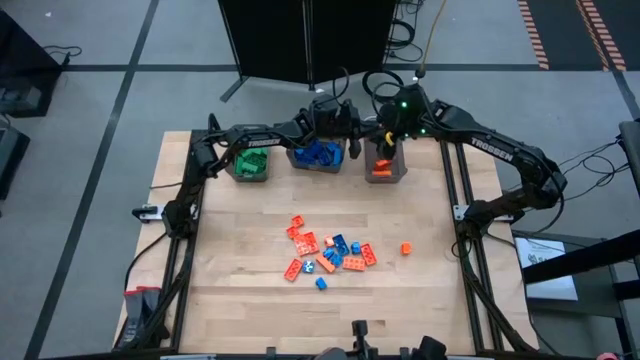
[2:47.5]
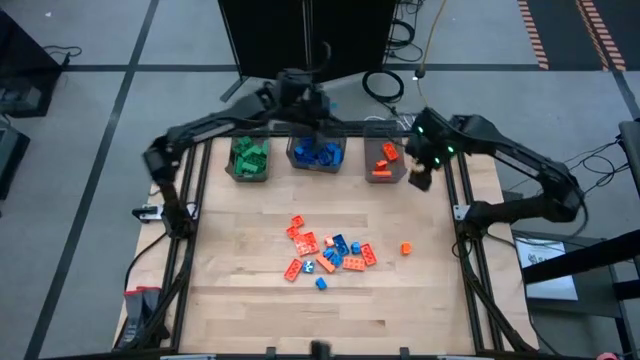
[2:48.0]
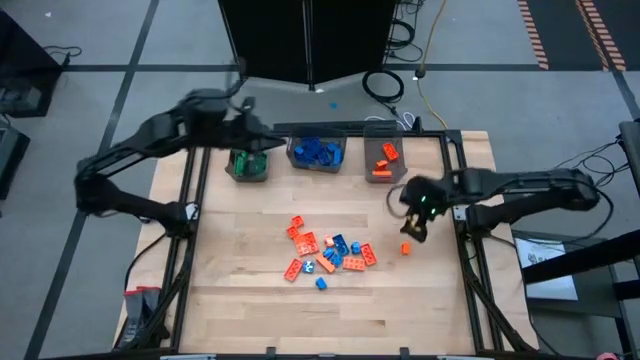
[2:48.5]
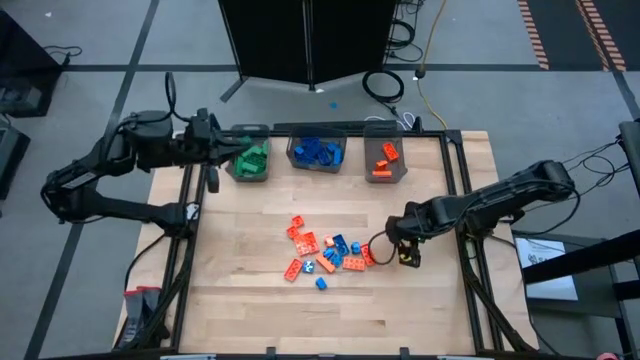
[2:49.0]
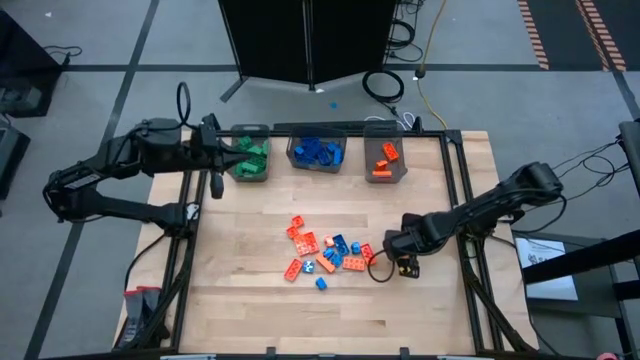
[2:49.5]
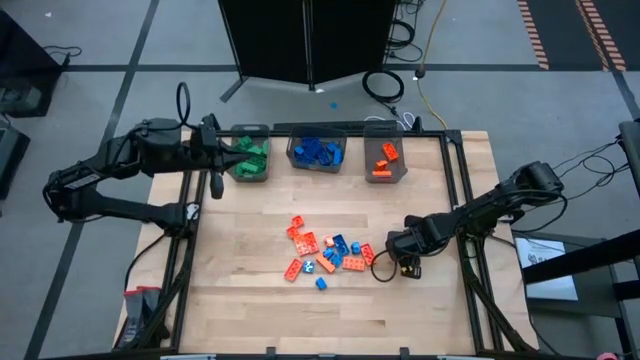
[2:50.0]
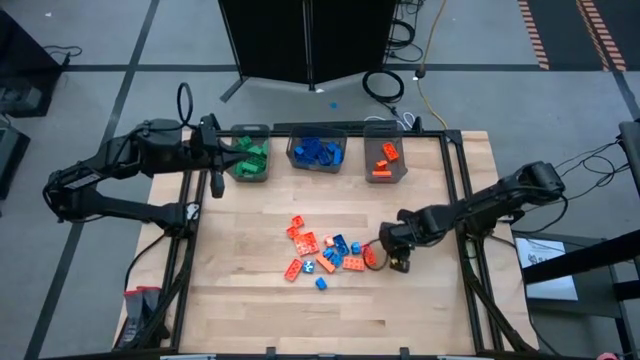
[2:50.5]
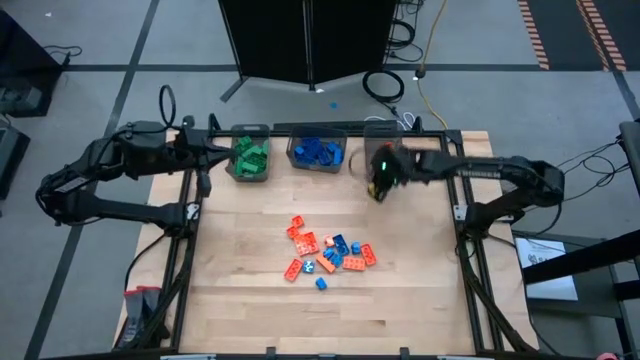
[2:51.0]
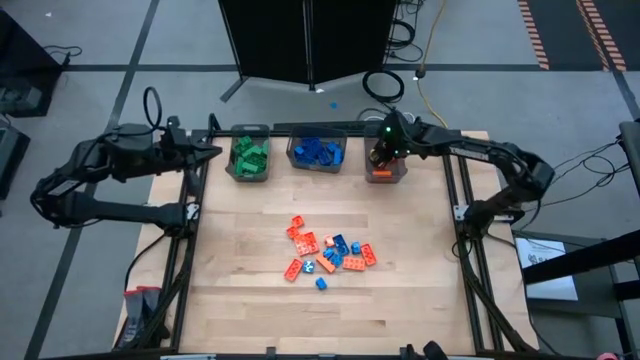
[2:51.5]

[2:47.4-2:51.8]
Task: Sort blocks
Put the orange game piece into the right black bin

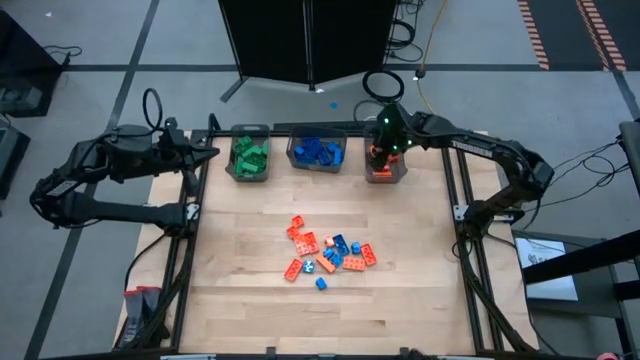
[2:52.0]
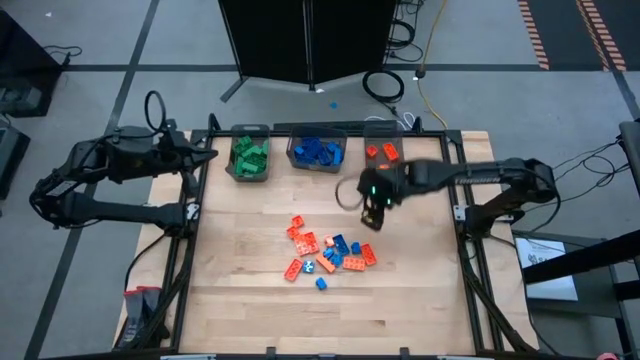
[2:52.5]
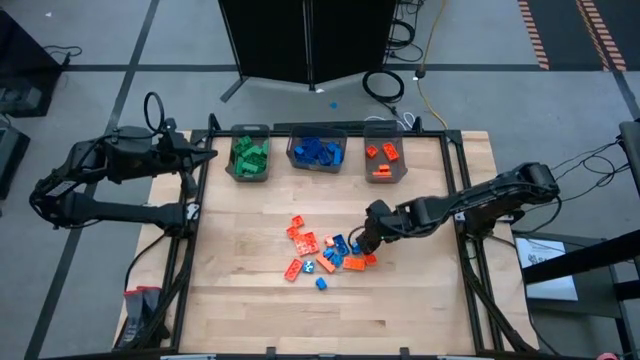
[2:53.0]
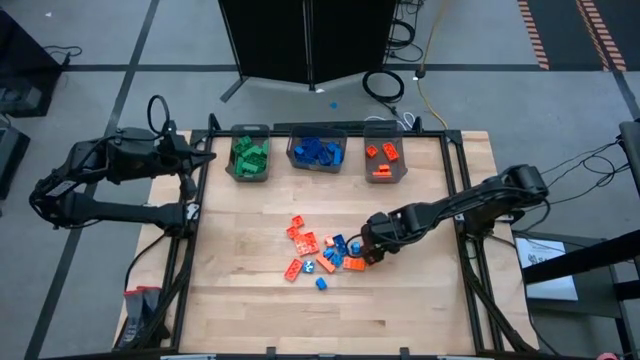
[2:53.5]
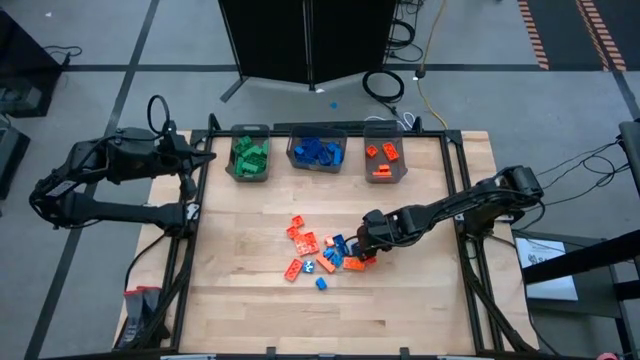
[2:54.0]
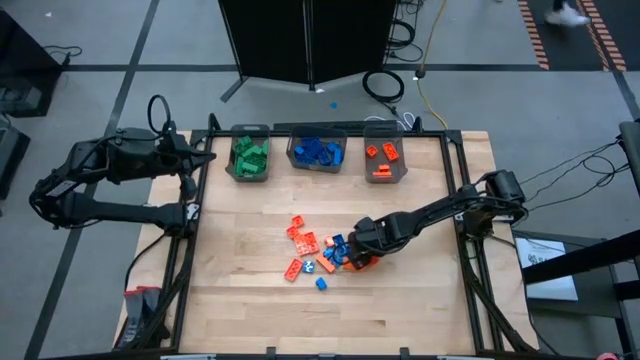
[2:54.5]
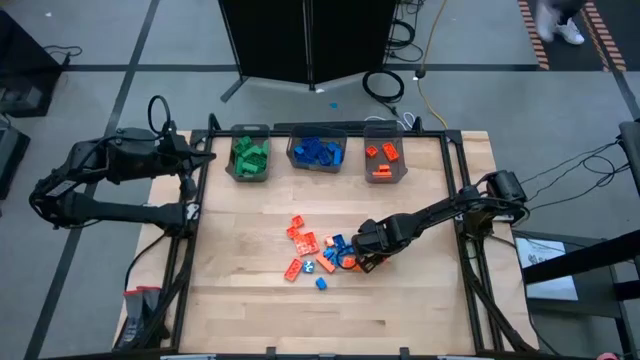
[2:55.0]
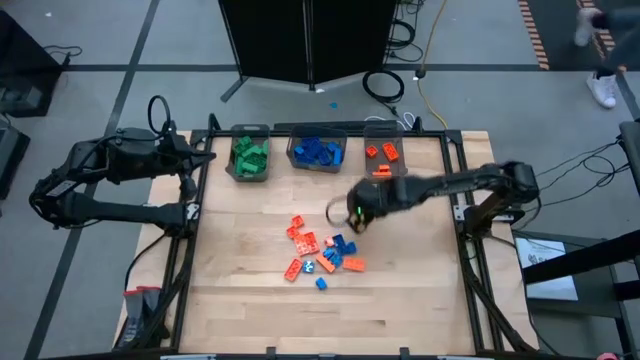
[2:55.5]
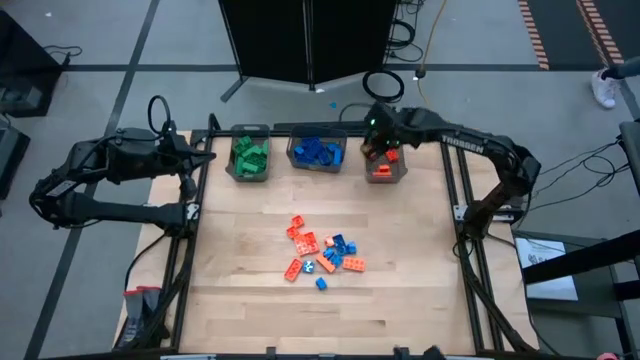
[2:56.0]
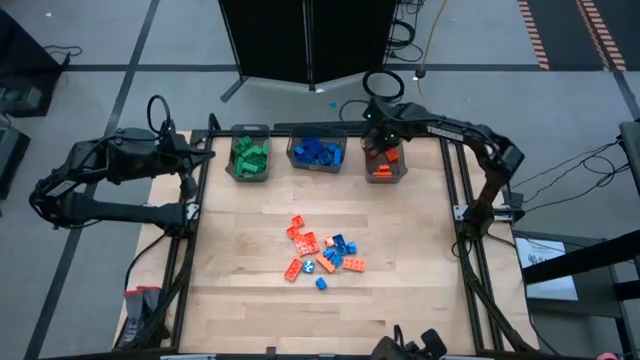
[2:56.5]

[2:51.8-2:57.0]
Put the orange game piece into the right black bin

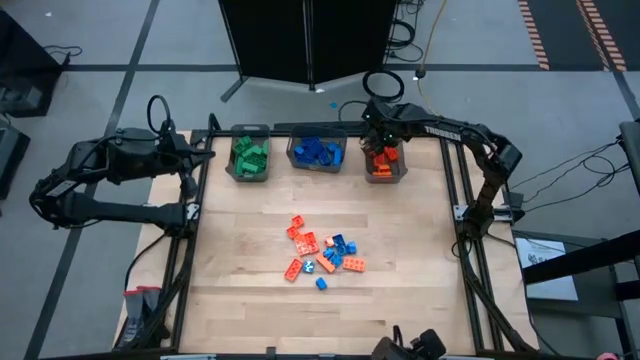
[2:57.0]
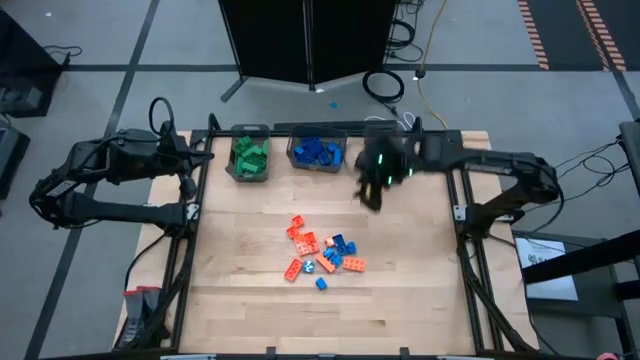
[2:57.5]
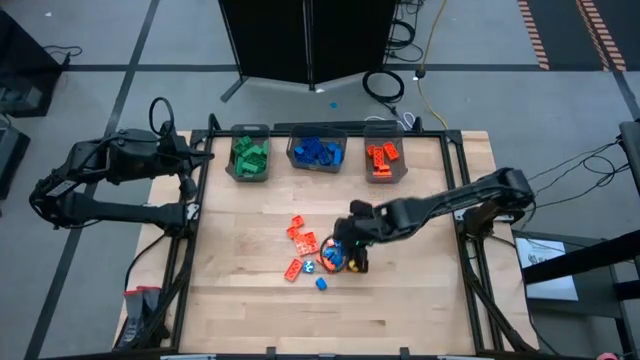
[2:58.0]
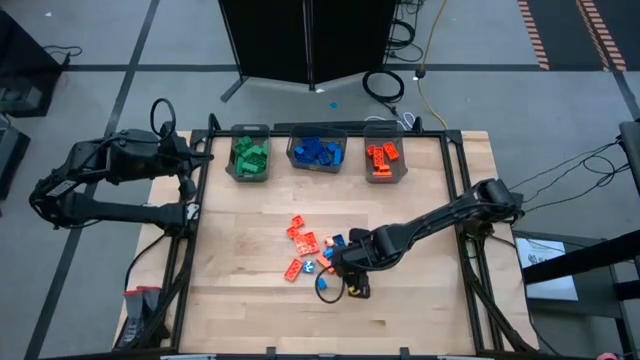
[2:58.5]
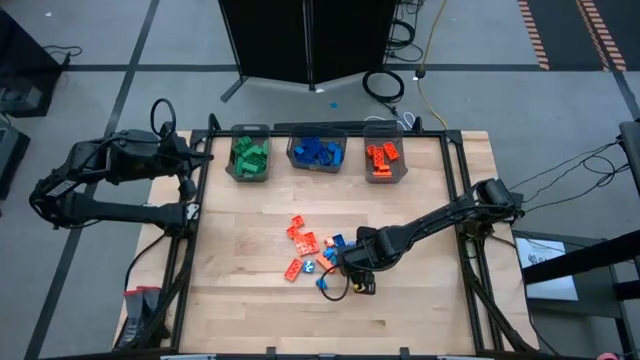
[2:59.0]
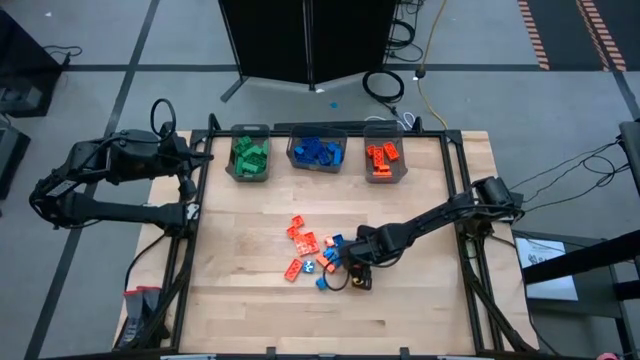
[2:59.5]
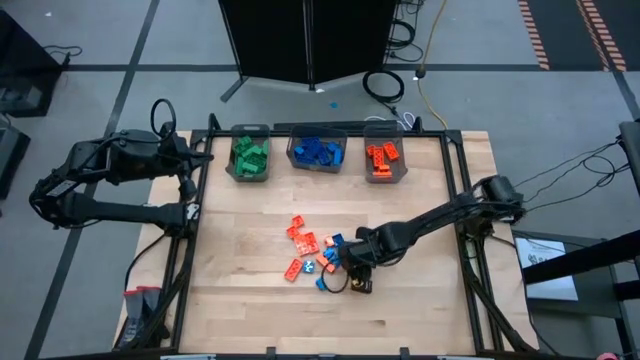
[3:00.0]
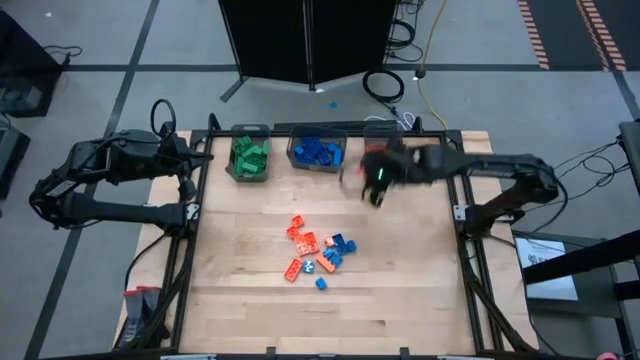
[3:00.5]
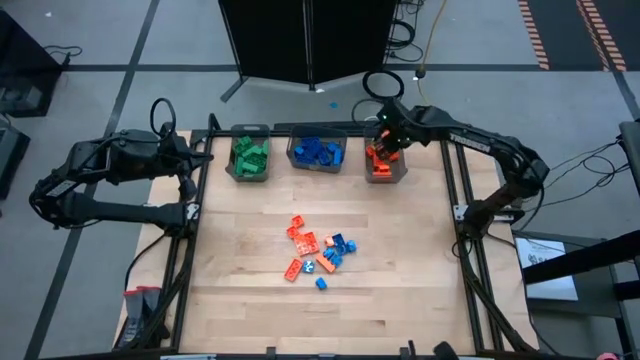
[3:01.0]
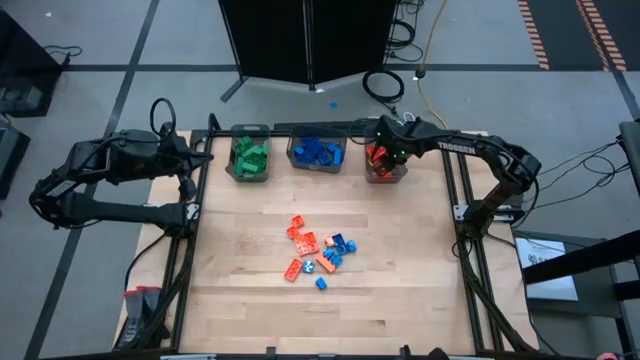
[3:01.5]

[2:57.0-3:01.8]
Put the orange game piece into the right black bin

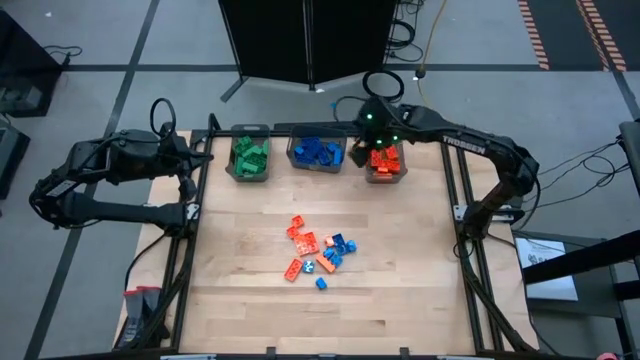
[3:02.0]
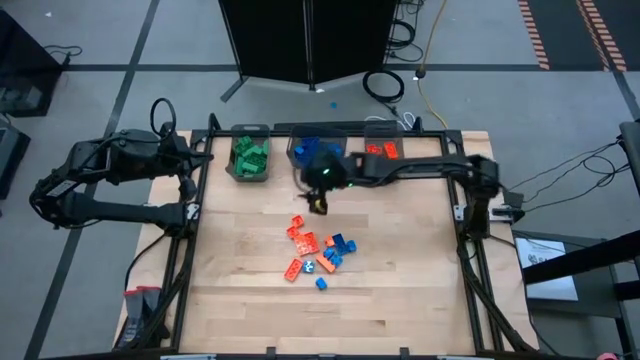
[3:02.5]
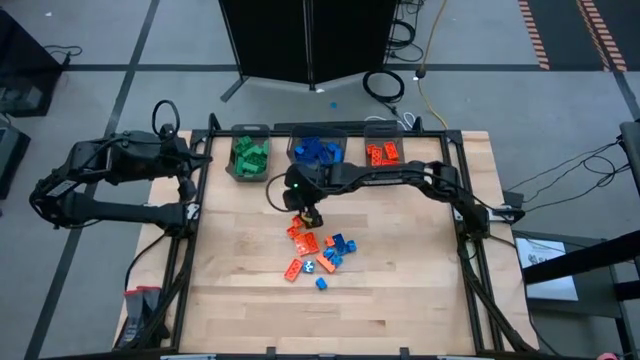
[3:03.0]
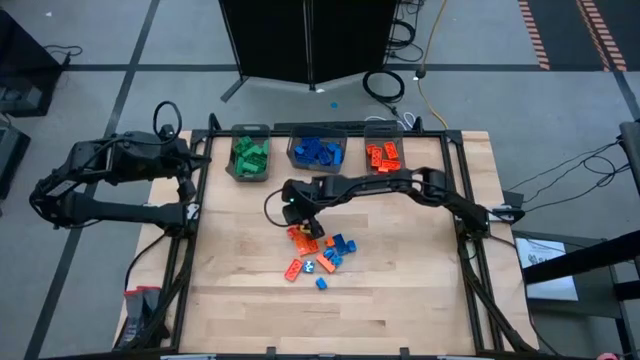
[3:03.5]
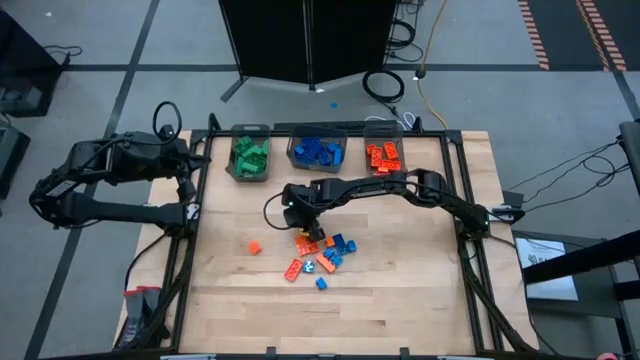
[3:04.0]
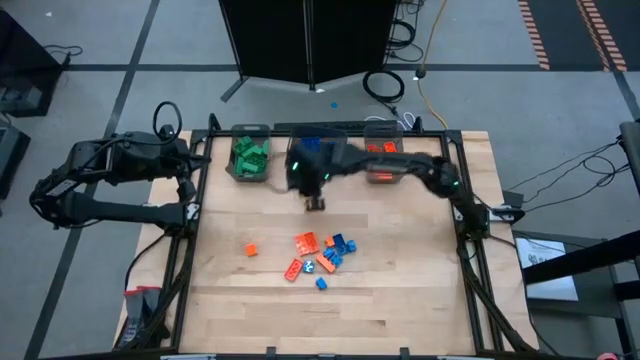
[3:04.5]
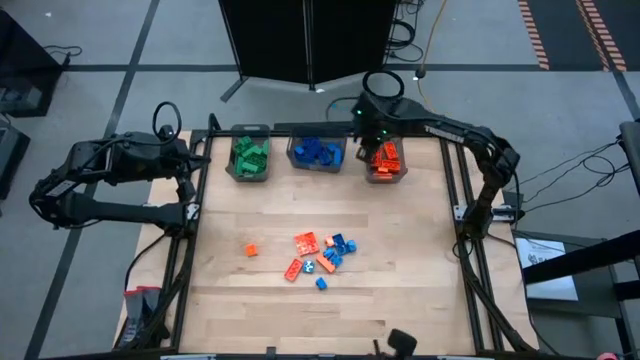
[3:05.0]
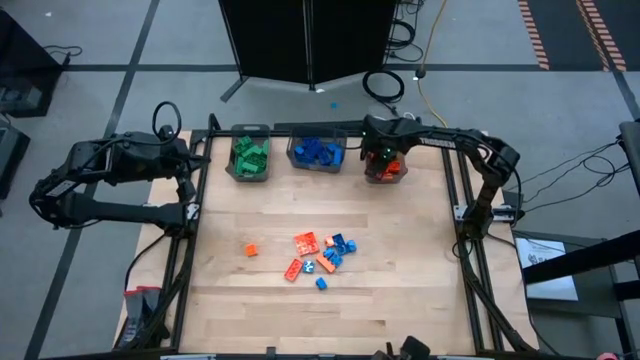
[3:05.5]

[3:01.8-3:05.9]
Put the orange game piece into the right black bin

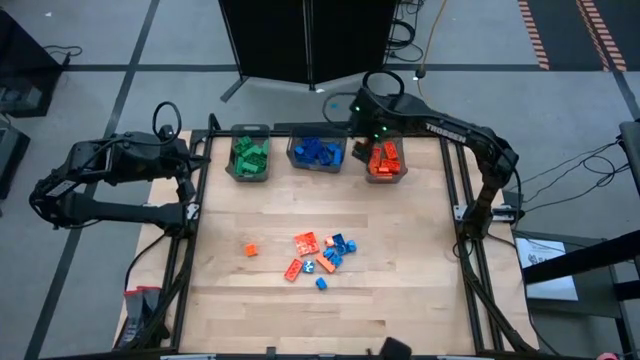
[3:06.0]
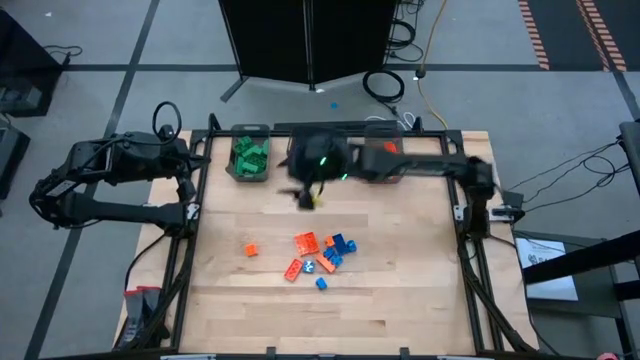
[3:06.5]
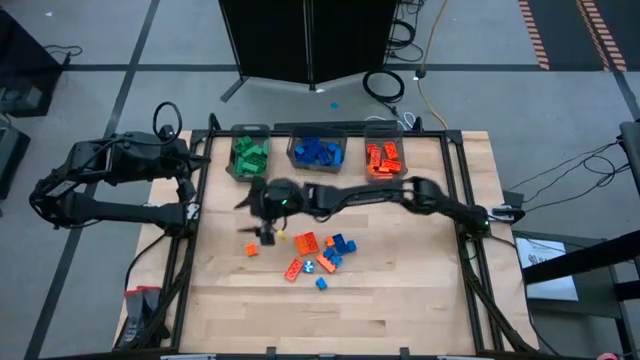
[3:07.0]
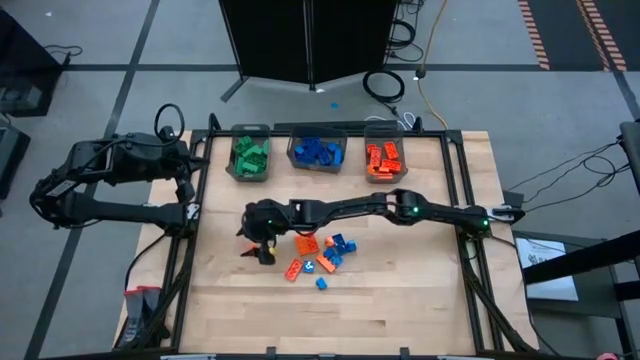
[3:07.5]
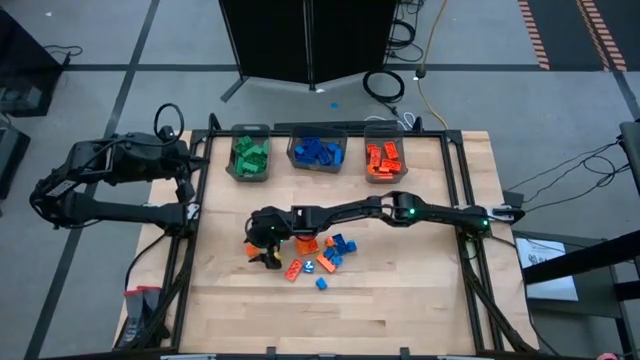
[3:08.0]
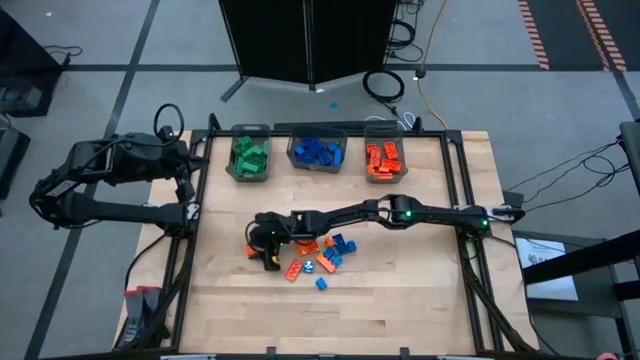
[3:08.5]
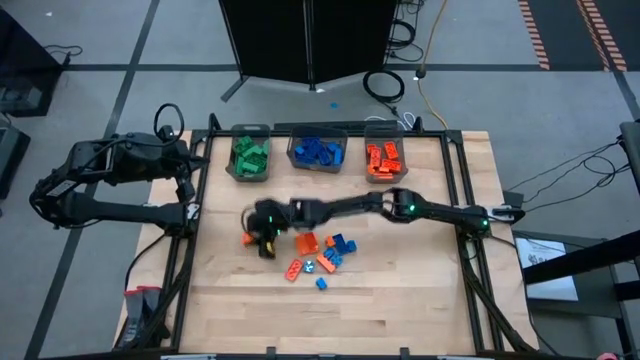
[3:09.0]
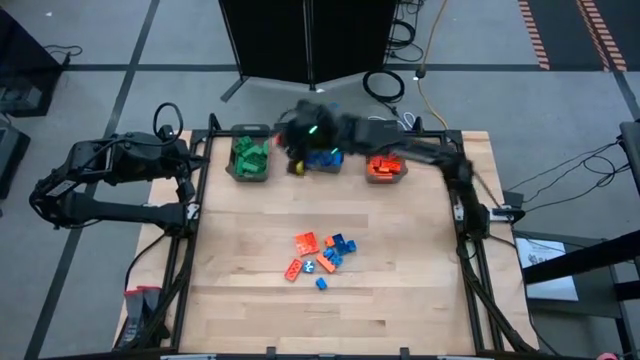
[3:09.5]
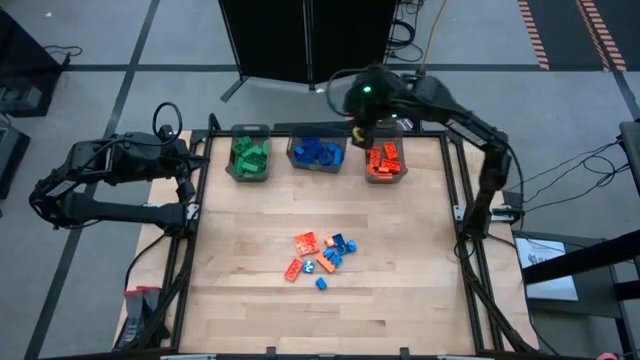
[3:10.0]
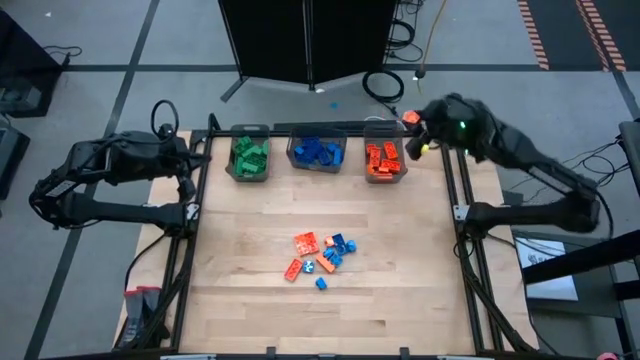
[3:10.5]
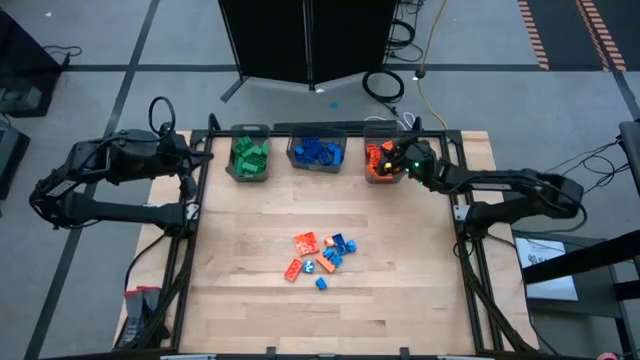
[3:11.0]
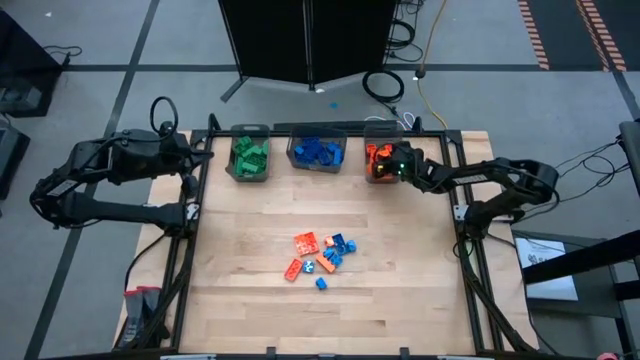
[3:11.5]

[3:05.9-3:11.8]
Put the orange game piece into the right black bin
